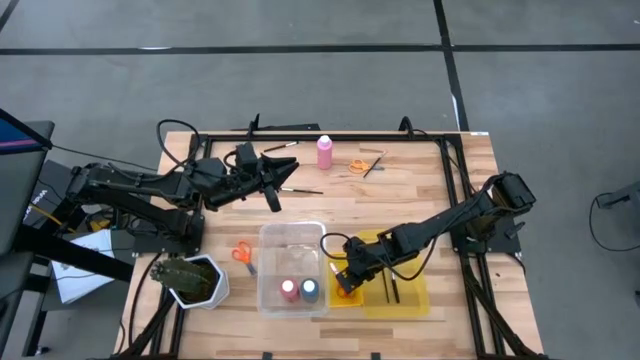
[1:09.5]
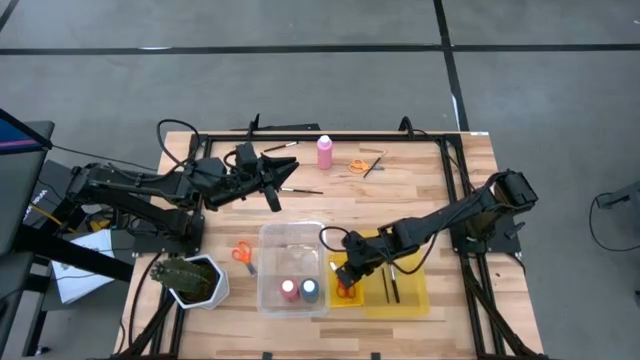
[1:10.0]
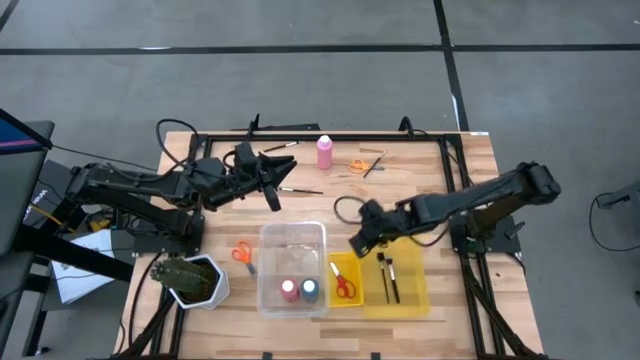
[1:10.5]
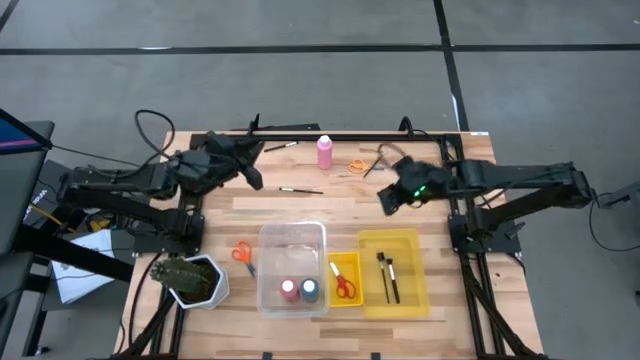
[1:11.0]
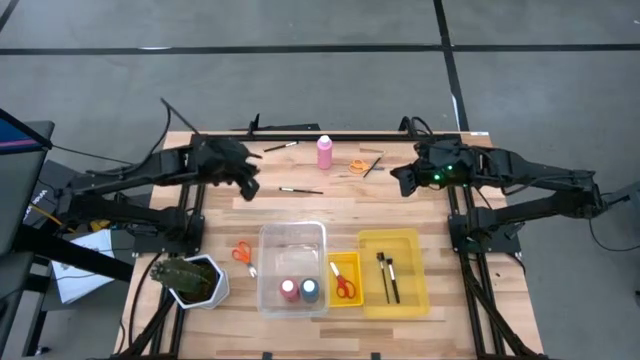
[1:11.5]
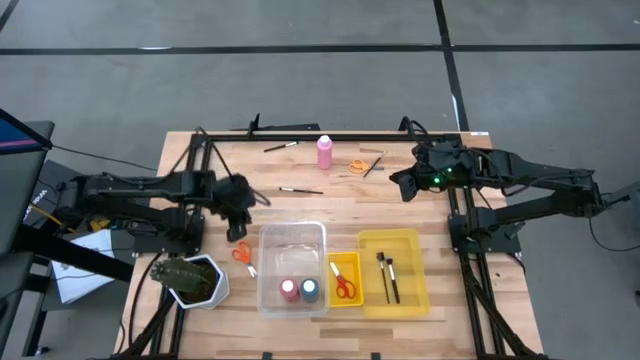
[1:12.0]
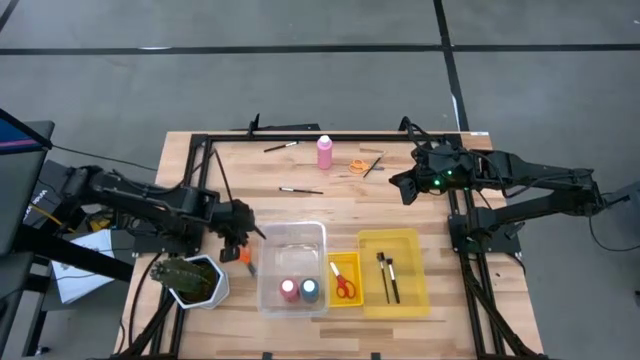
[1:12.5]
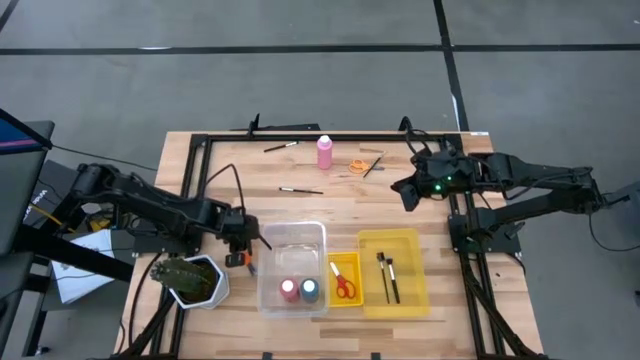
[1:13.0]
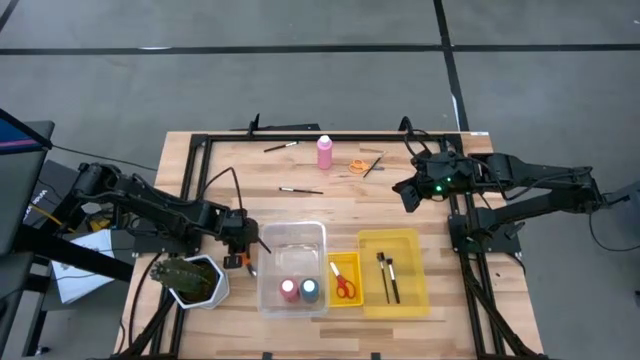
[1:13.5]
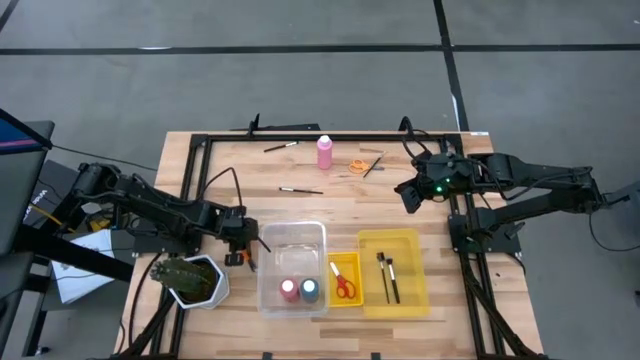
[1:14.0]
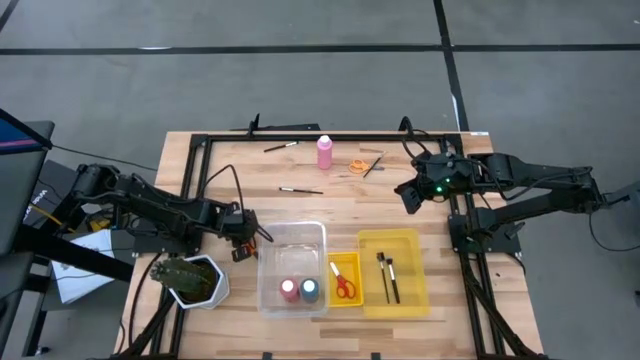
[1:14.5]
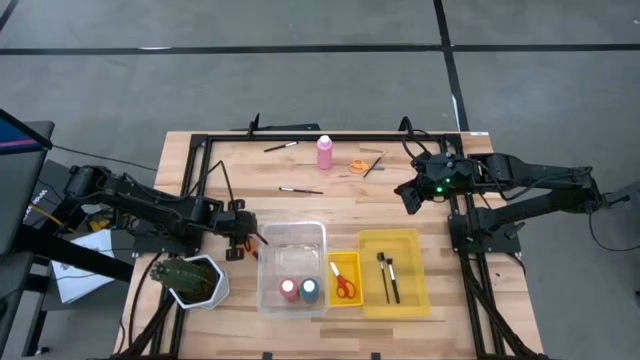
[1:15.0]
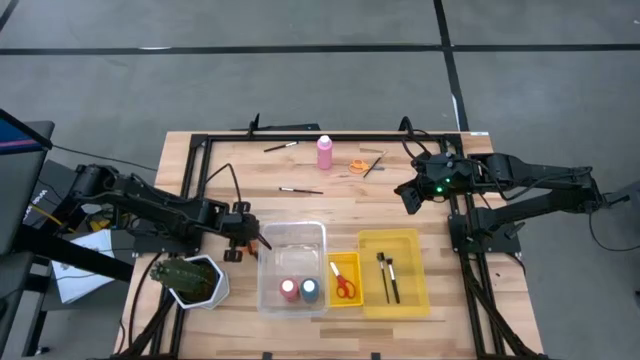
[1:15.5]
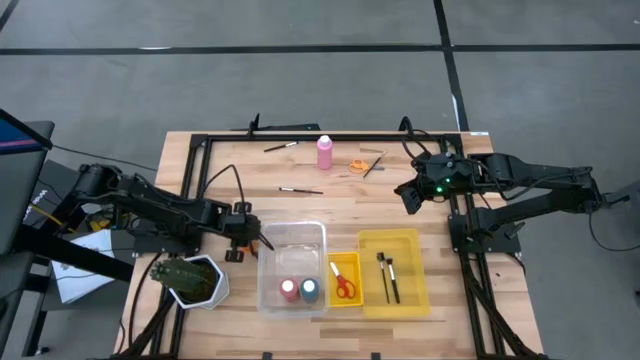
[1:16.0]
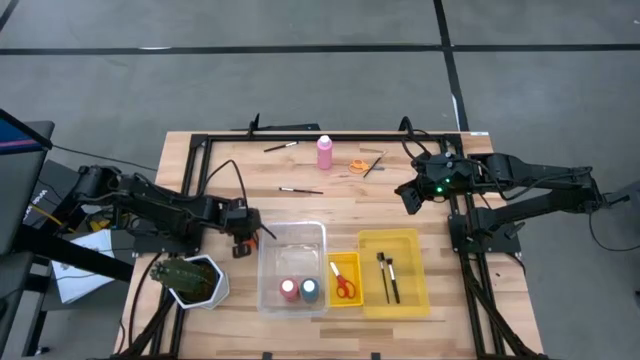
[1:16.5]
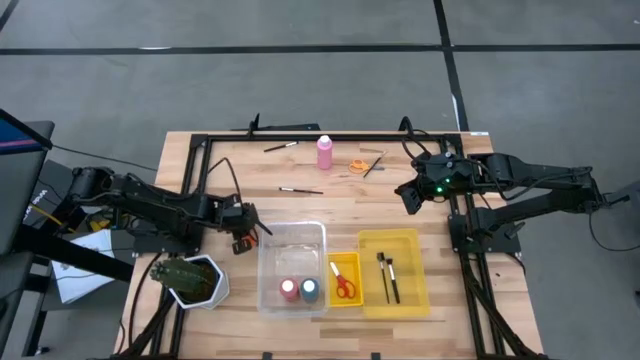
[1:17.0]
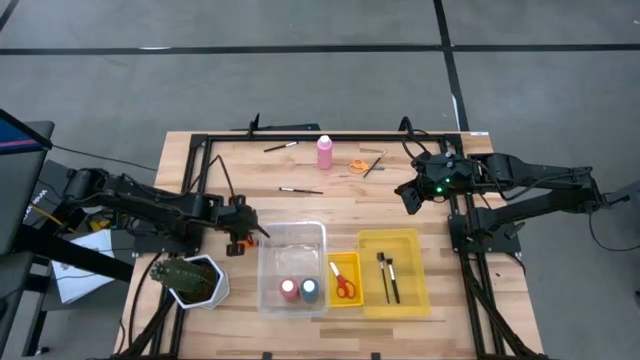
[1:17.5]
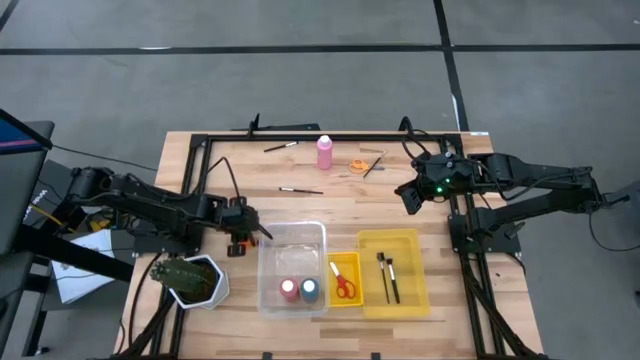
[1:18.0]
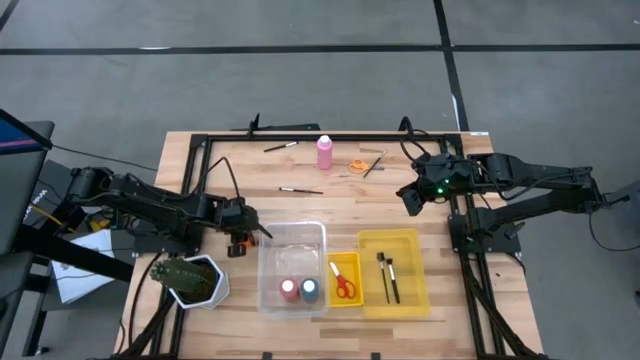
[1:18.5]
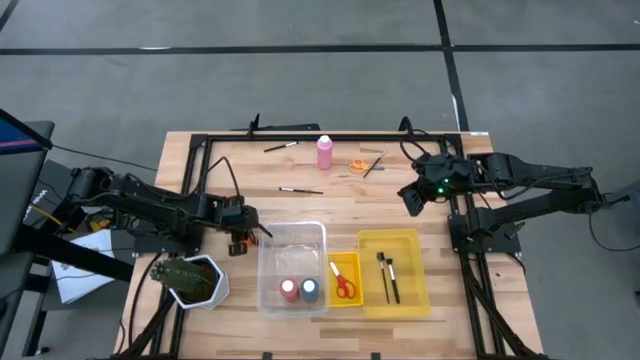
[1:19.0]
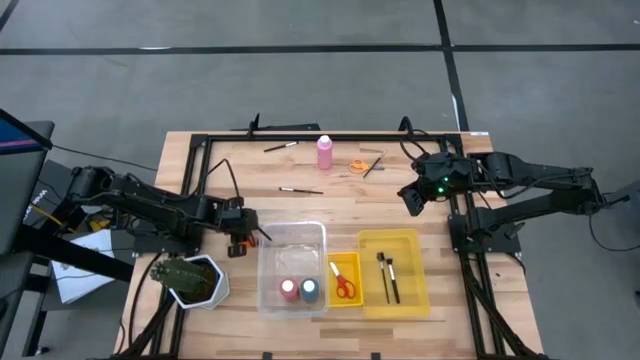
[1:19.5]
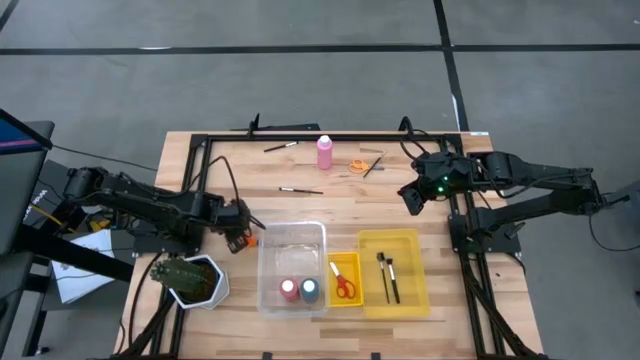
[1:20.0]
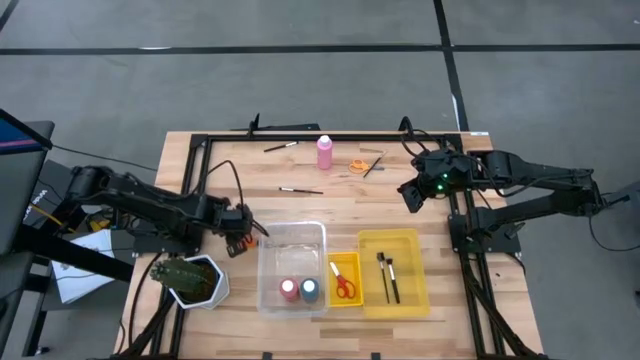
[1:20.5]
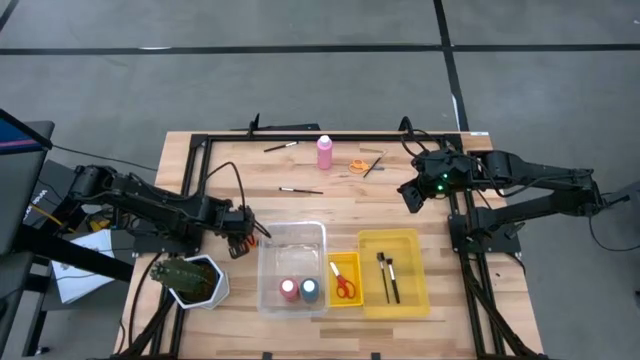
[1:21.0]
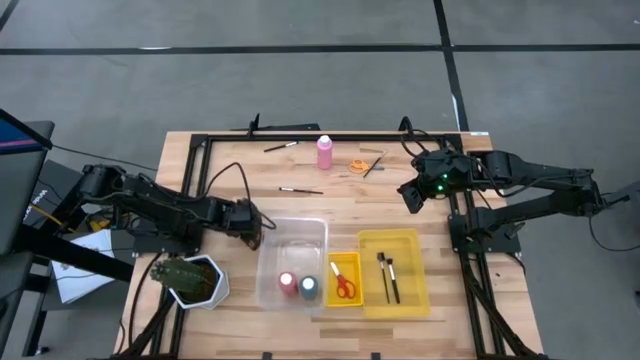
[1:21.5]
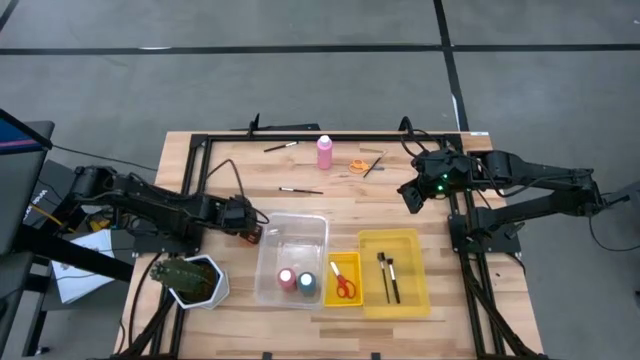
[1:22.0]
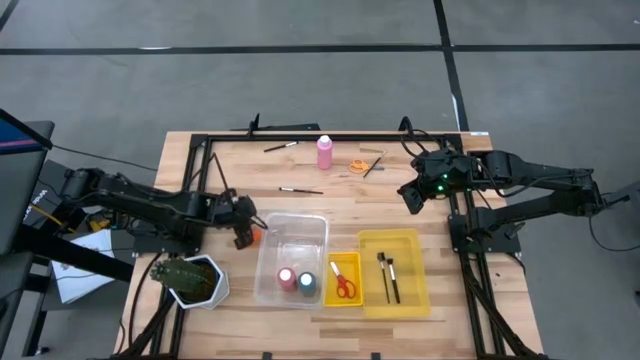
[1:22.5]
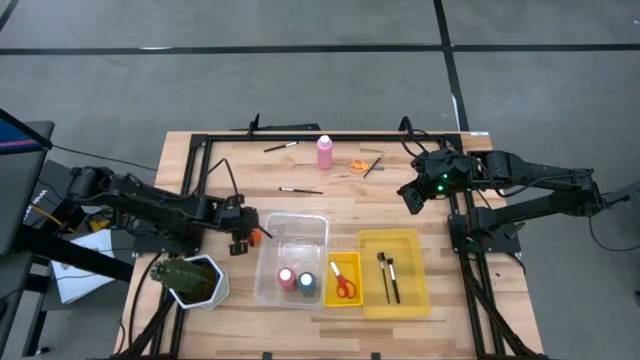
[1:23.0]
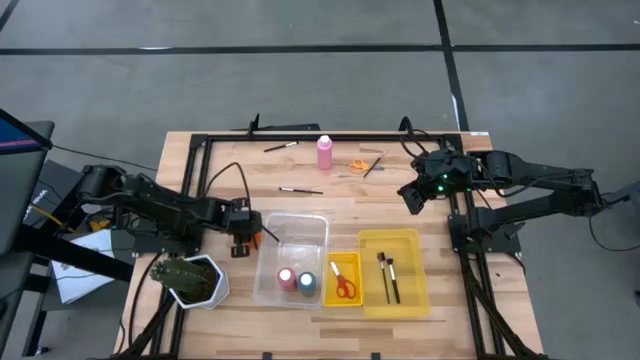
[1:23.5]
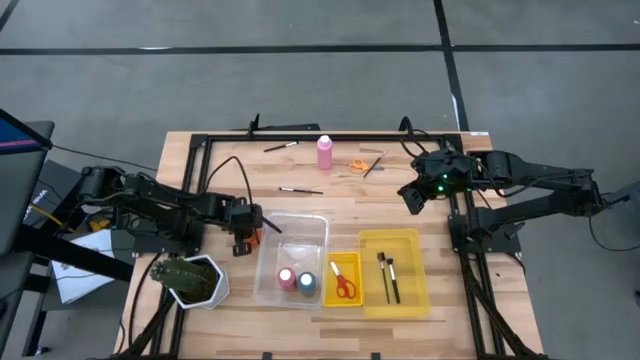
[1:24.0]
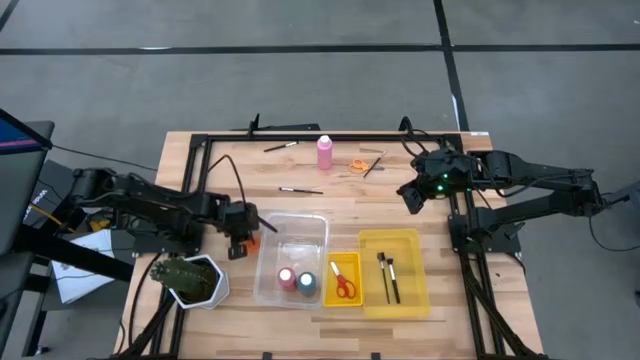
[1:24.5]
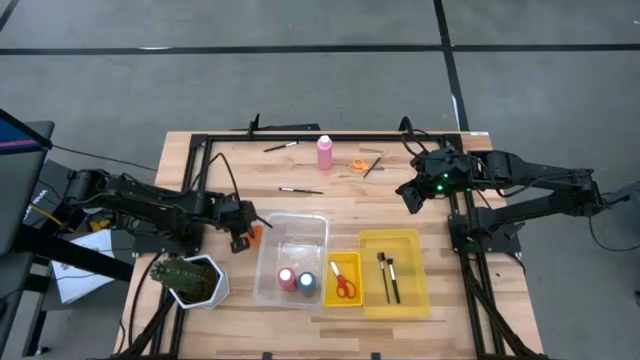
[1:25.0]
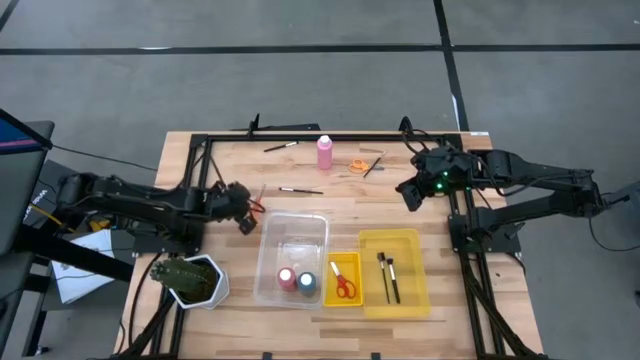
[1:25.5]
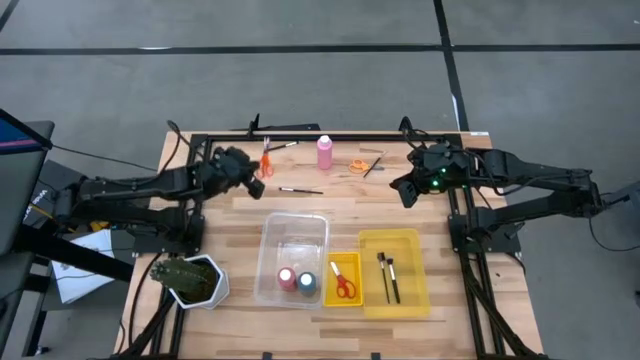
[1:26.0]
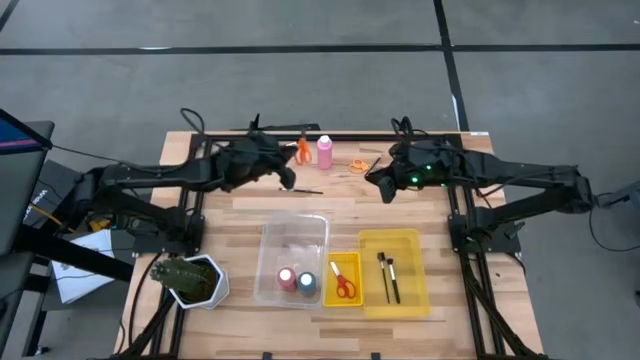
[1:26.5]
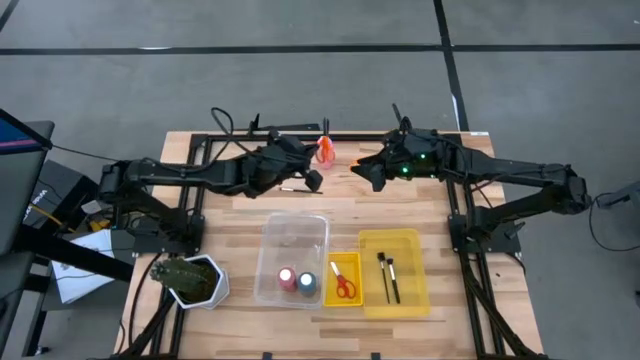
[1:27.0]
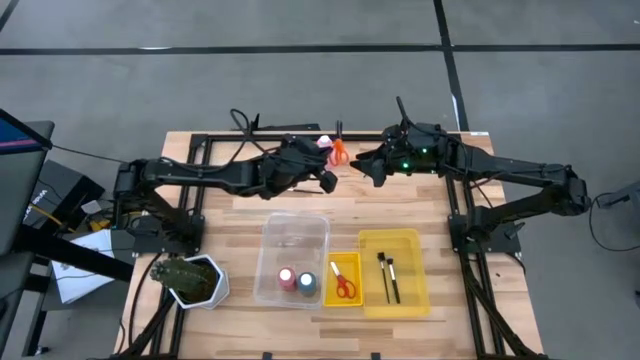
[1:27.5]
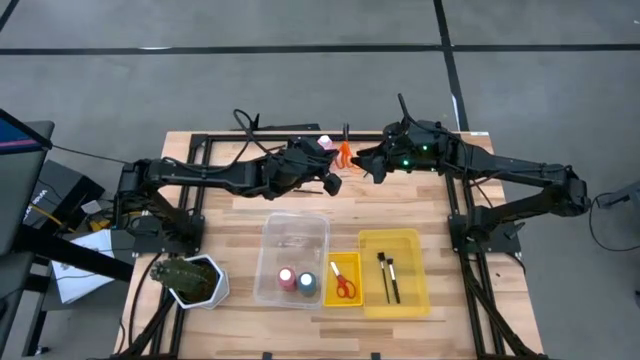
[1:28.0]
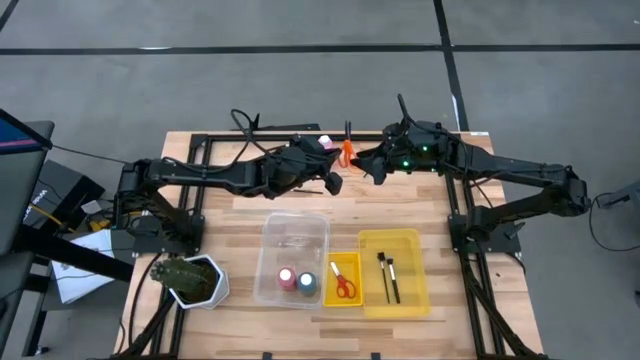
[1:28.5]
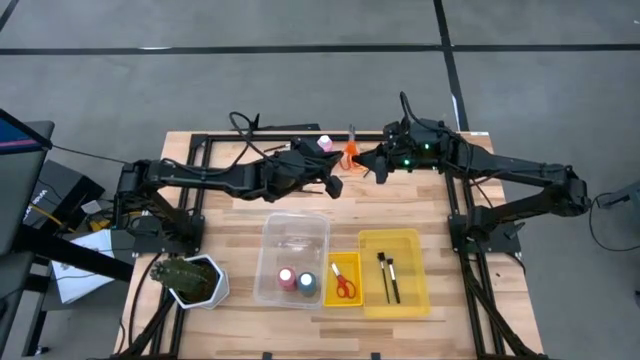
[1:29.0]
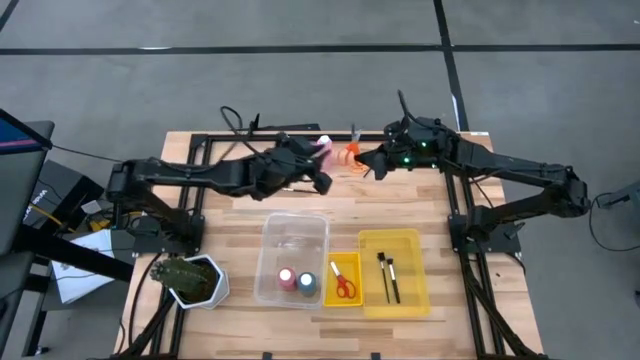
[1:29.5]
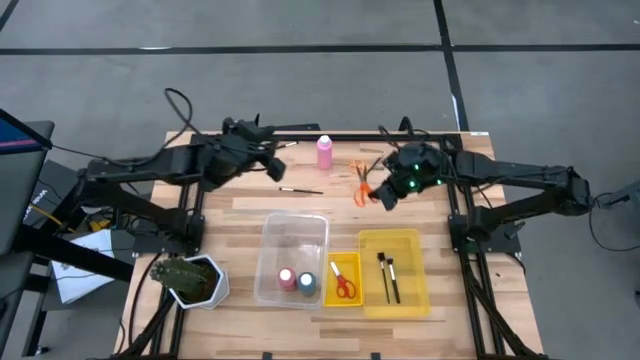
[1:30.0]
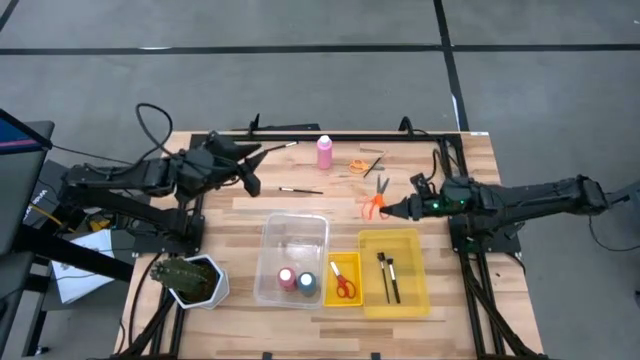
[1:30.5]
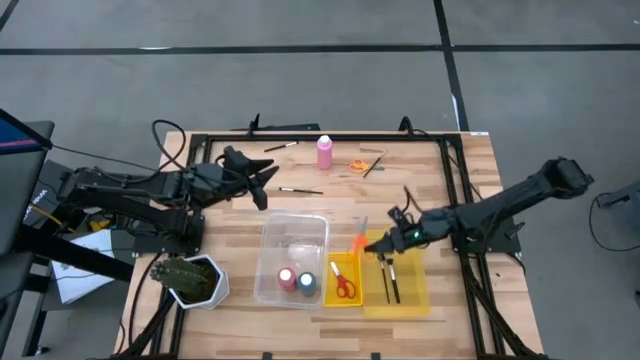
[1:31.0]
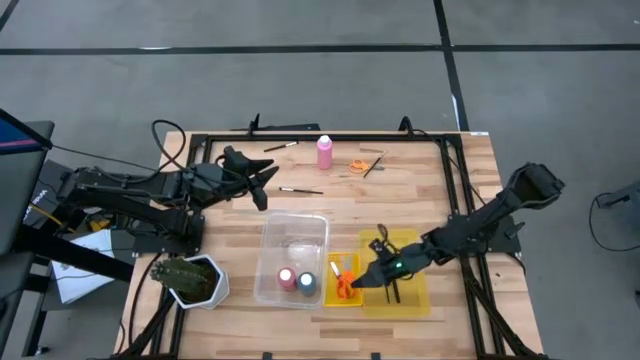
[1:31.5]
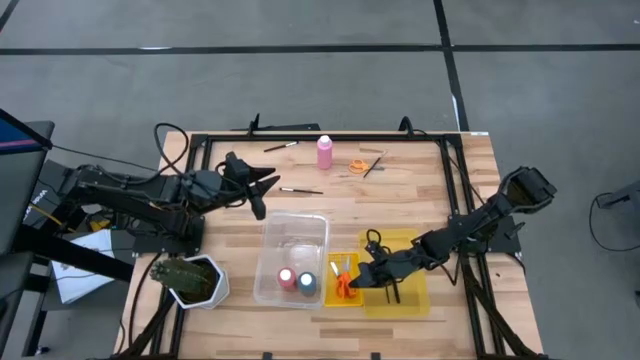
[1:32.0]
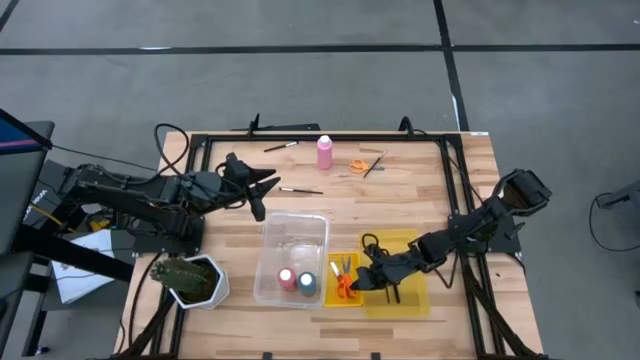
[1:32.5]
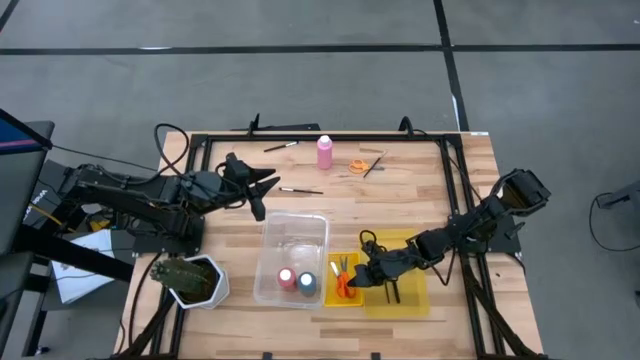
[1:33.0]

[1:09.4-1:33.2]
Task: Pick & Place Paint Supplies
Put the orange scissors into the left yellow bin
